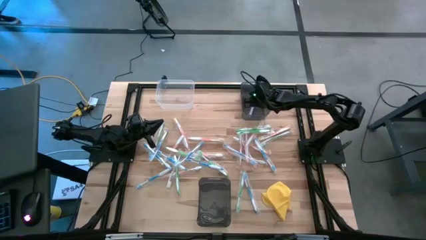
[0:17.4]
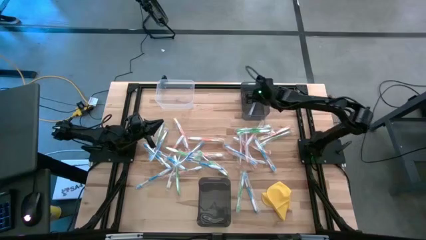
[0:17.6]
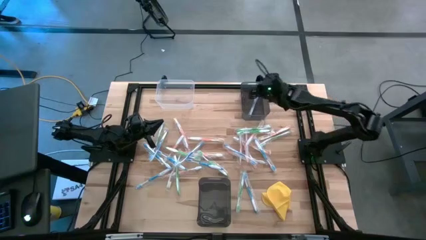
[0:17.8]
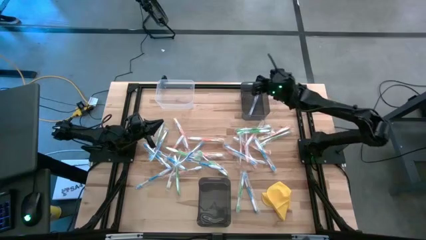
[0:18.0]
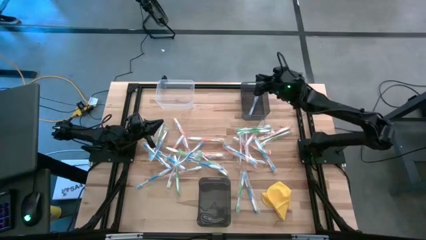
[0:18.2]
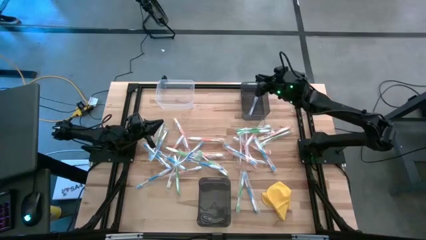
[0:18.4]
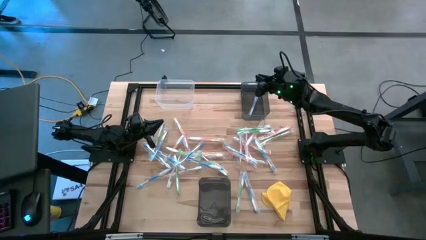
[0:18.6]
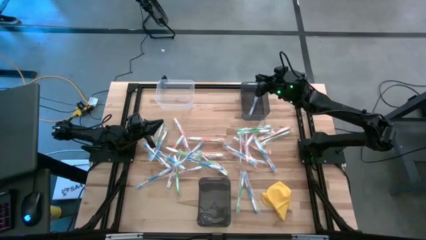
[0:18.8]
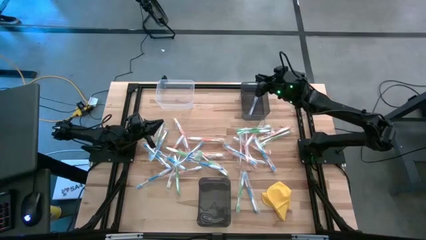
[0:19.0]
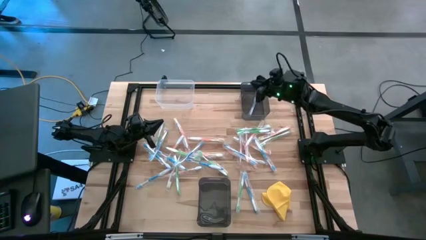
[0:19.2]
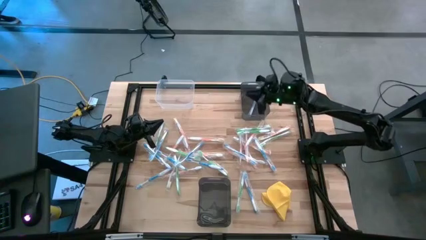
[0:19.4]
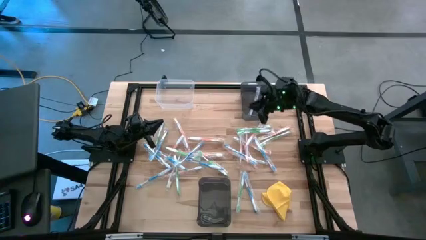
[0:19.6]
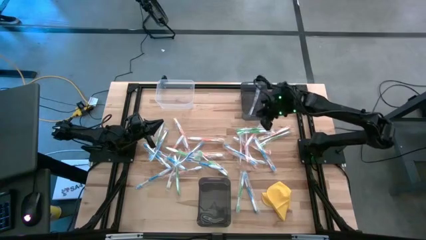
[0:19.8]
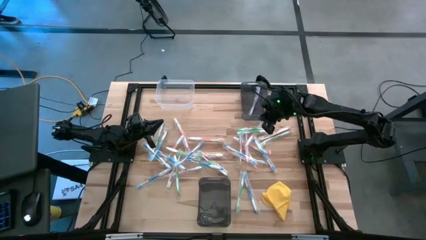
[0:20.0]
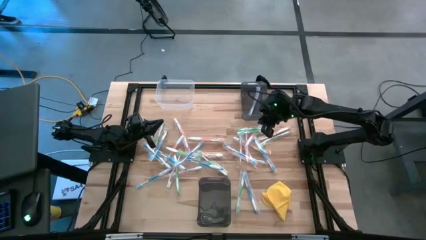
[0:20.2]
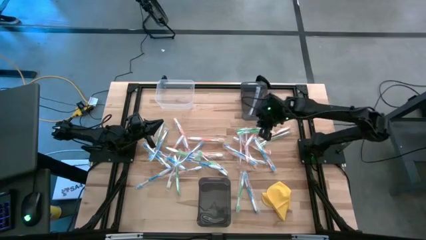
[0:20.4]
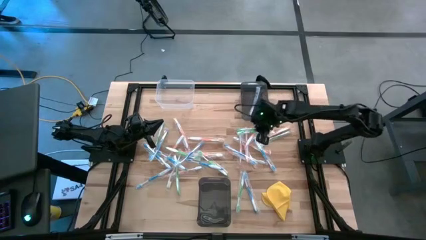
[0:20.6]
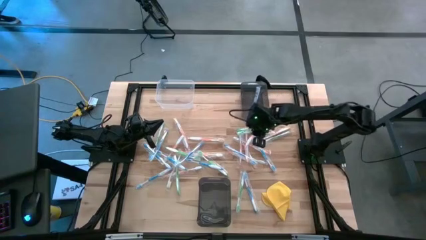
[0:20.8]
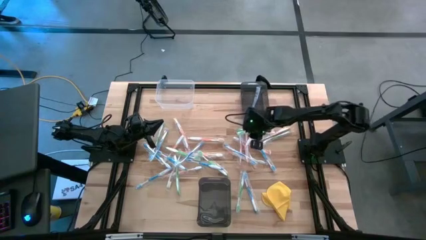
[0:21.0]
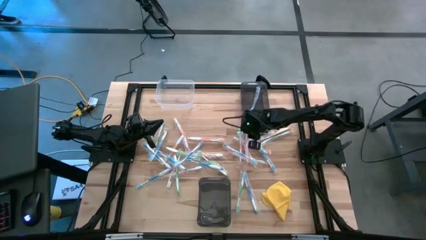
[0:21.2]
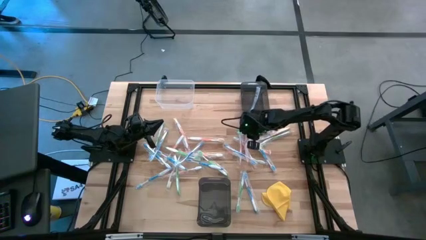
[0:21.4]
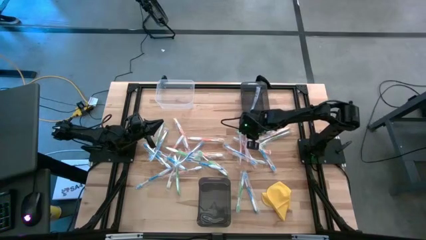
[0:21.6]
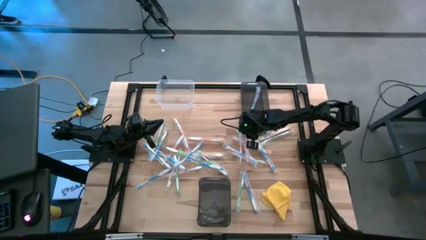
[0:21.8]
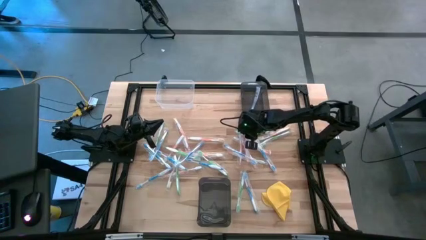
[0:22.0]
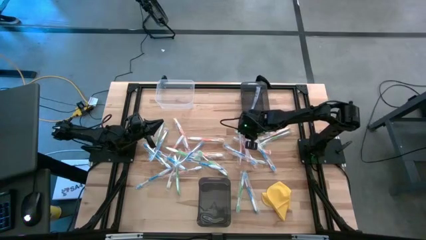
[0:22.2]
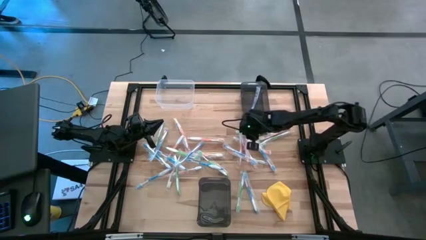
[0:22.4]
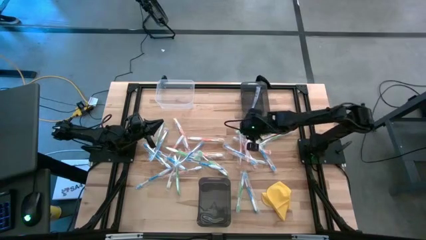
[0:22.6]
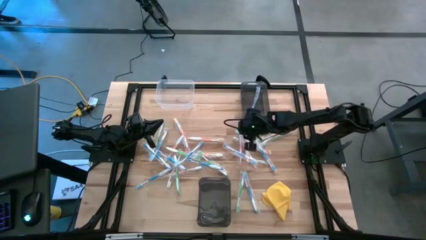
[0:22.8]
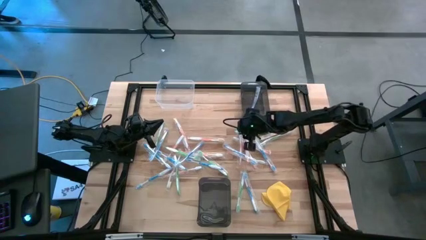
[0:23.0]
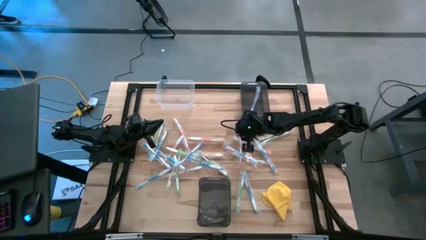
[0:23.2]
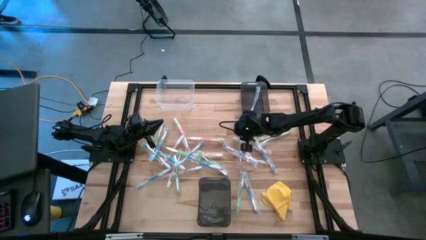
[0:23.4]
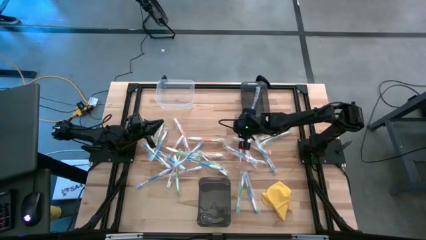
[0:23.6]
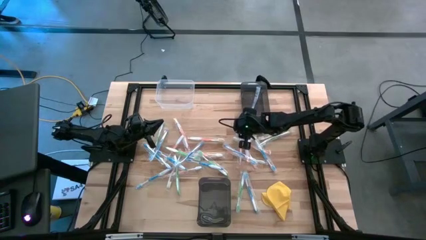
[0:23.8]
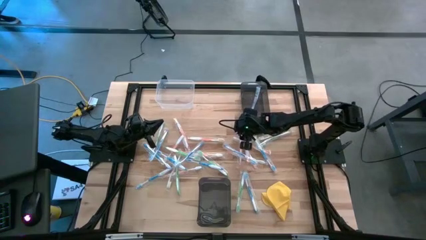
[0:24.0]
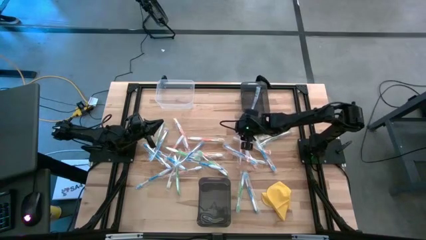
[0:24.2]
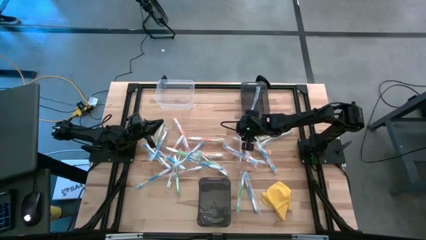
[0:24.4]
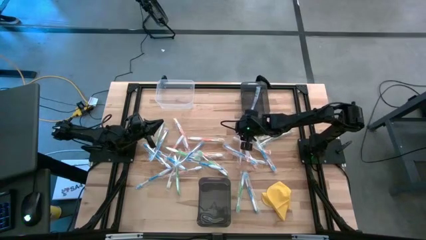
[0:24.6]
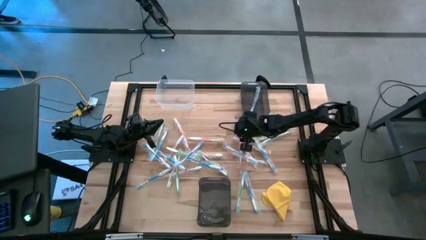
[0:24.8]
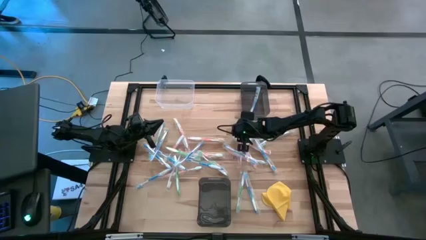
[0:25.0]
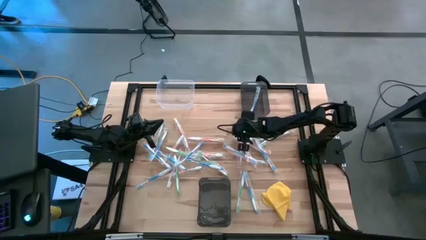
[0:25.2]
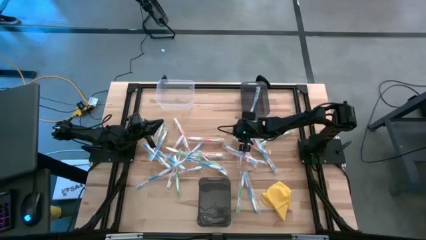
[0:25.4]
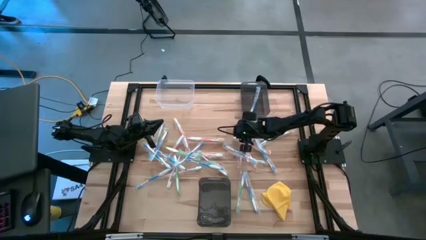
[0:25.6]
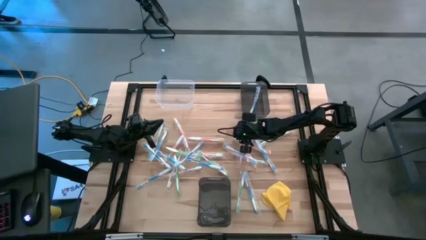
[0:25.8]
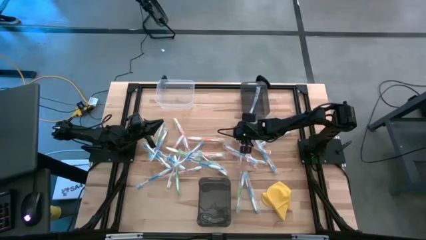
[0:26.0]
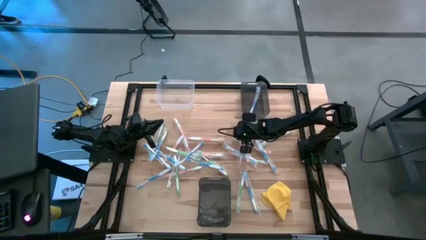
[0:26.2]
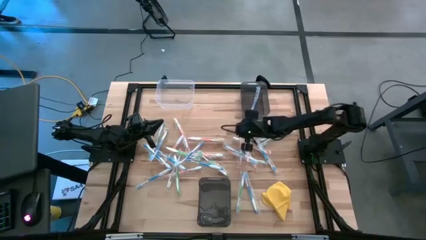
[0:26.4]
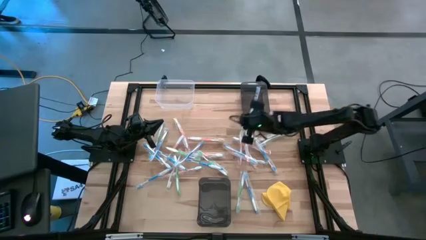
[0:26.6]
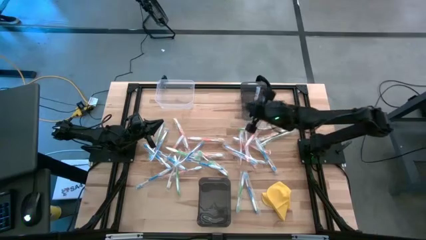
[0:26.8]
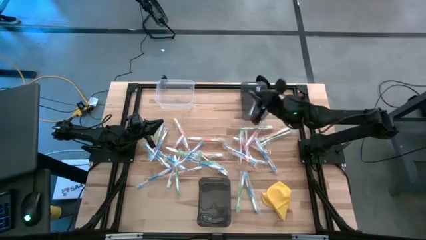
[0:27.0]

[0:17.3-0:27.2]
Task: Pick & Place Toothbrushes
Put the green toothbrush into the transparent bin

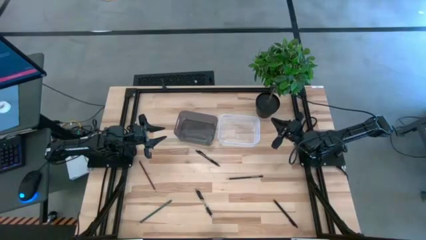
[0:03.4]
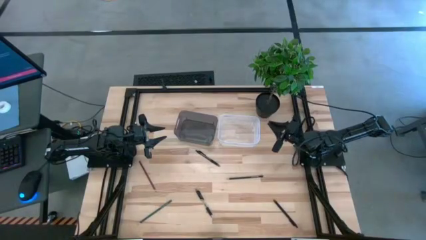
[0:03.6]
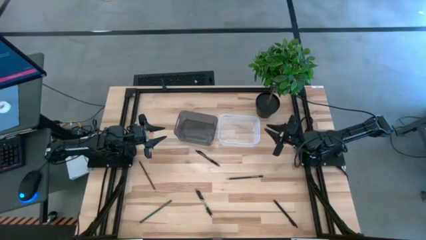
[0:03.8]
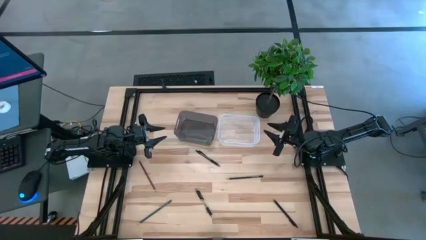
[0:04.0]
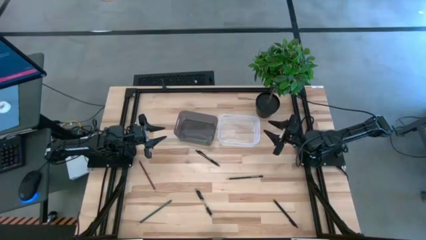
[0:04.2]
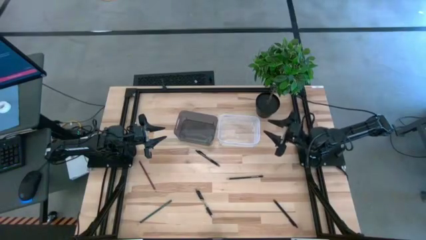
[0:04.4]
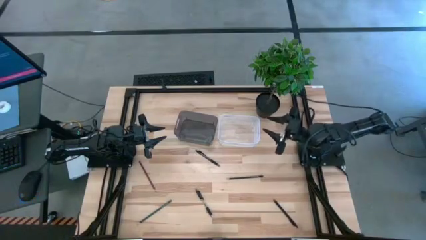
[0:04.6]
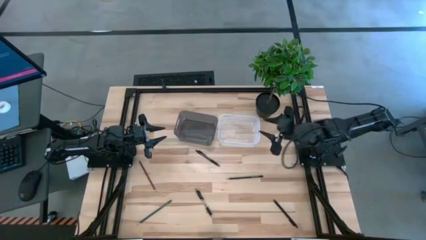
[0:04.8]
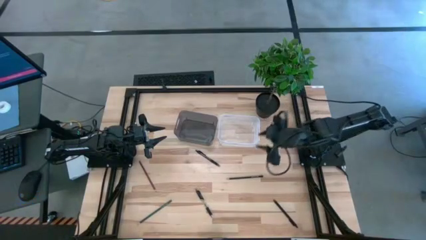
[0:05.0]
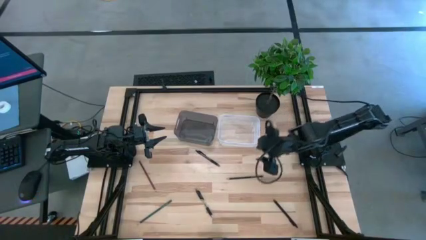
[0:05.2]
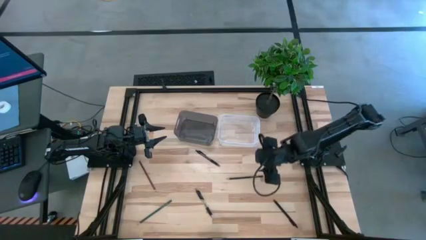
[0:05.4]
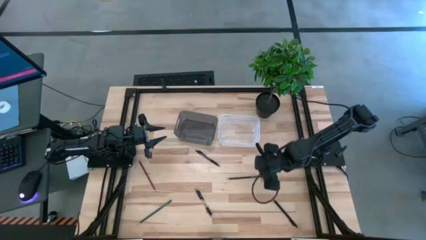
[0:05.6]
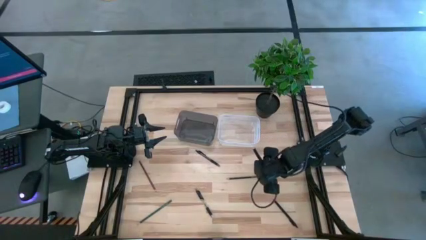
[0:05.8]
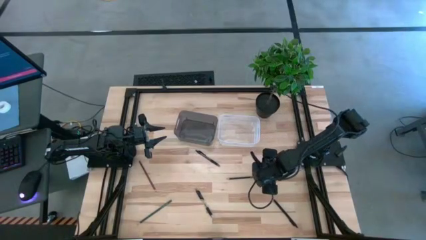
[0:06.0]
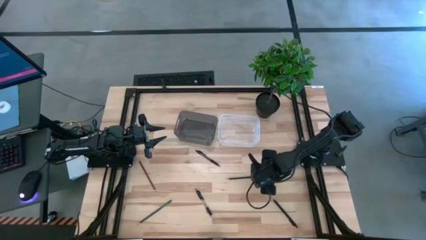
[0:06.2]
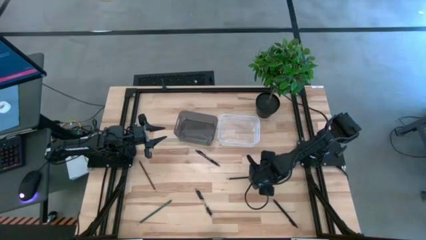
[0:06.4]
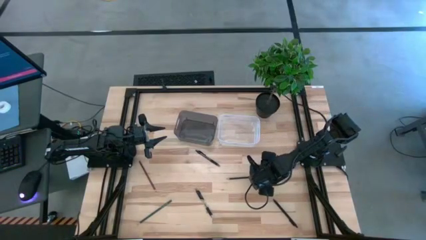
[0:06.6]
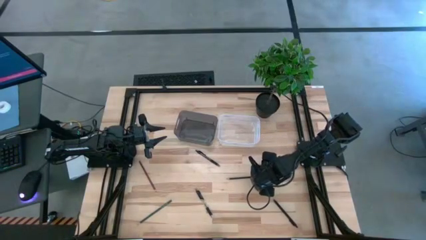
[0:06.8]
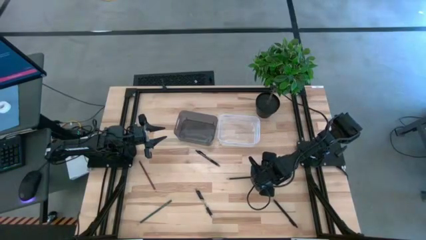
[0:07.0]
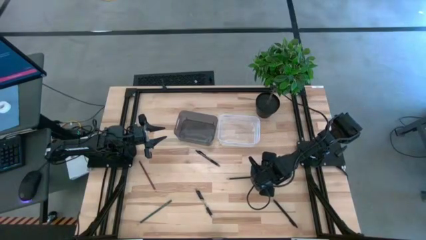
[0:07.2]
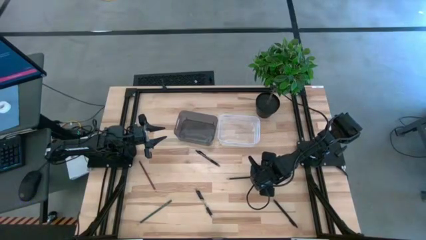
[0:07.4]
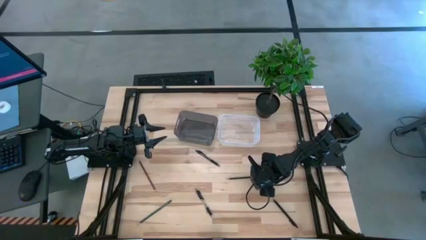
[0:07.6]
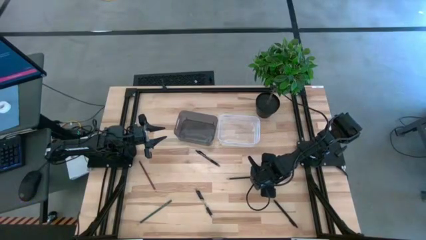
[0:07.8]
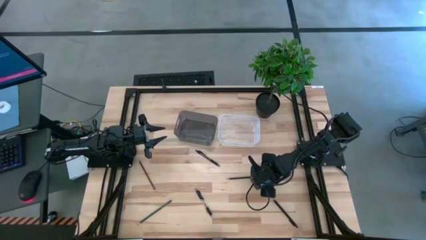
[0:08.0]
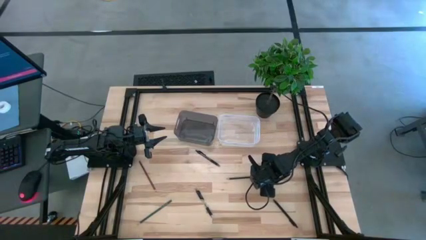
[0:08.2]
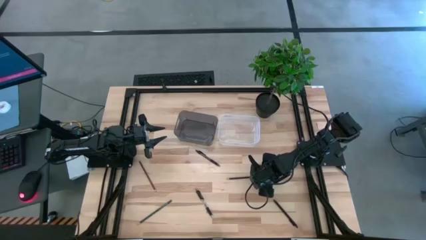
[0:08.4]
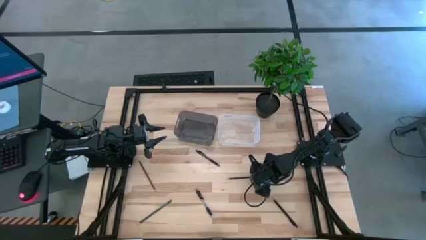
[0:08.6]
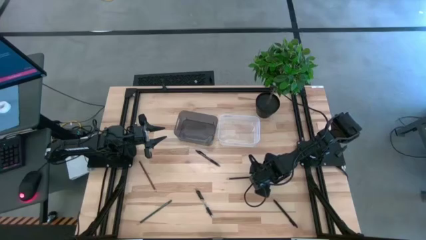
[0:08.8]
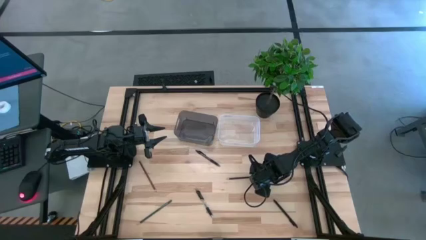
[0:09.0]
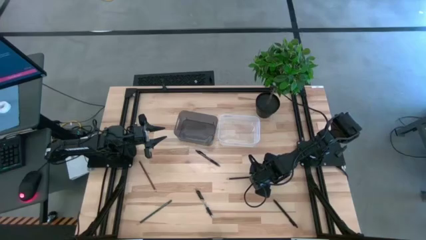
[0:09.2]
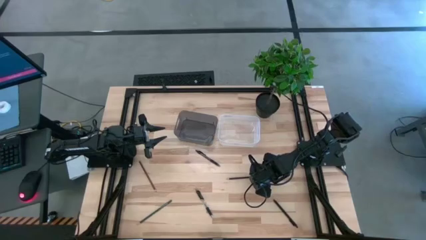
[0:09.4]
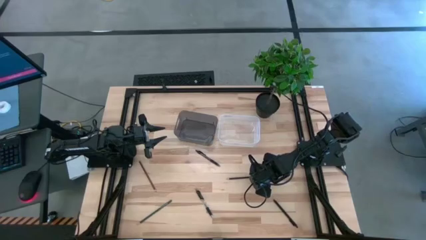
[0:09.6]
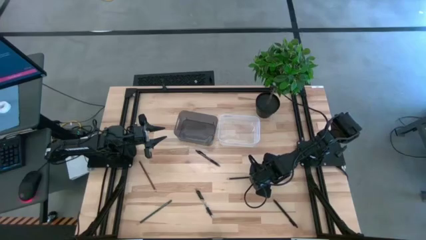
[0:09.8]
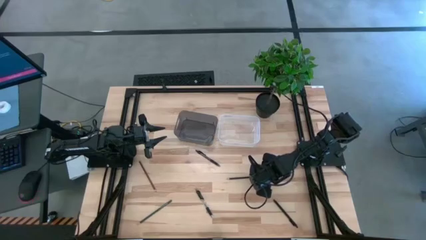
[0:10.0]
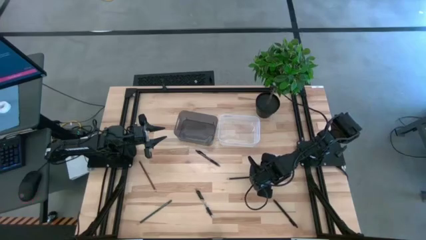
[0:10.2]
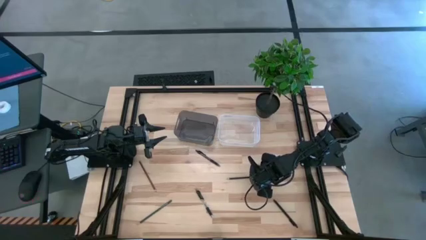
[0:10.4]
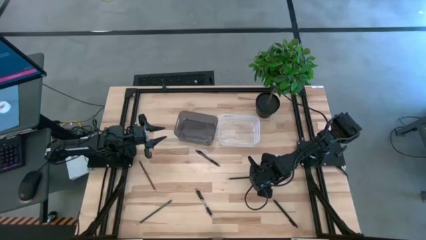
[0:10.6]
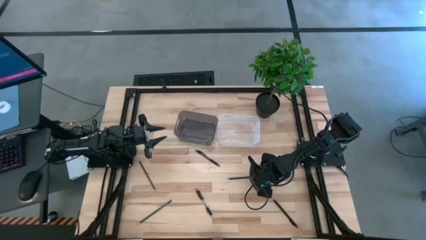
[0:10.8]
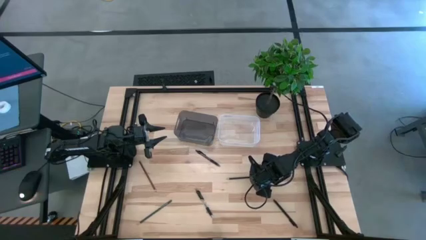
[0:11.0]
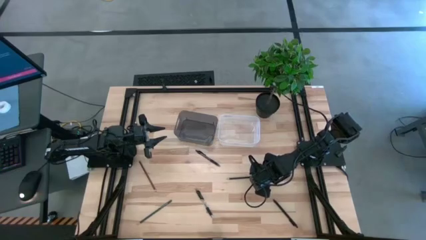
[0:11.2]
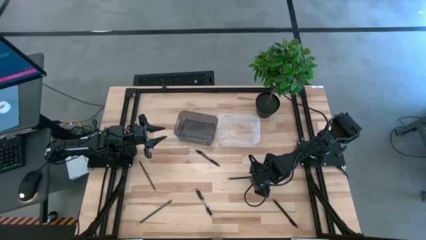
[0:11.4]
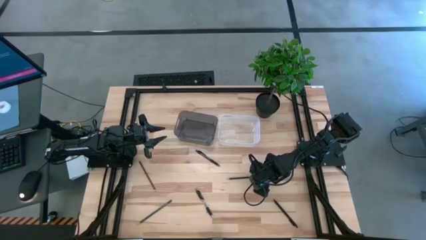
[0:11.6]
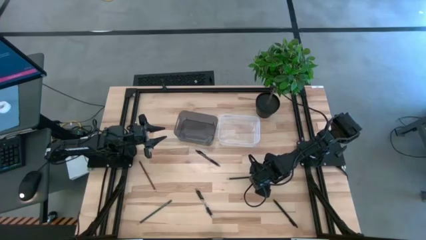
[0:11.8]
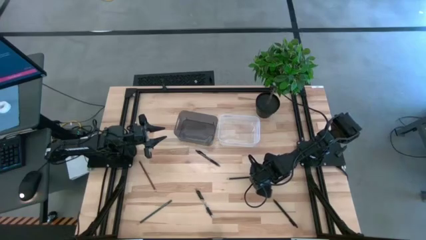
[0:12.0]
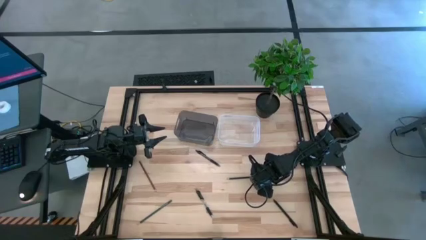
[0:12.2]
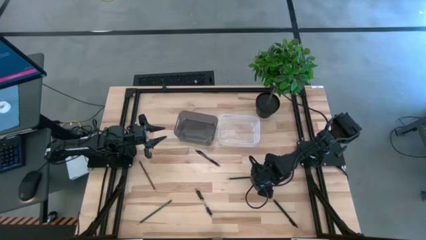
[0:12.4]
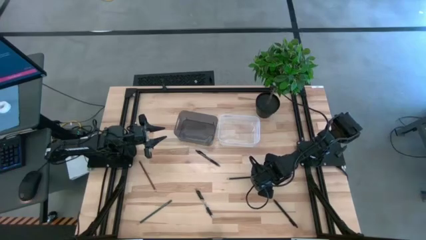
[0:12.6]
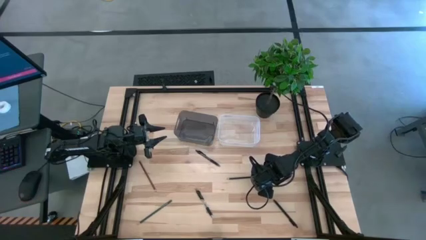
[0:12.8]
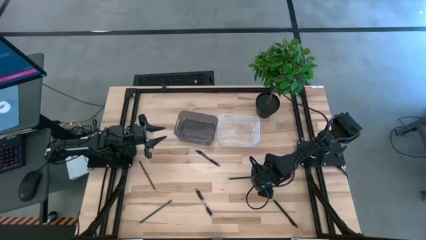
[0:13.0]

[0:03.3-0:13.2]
Task: Sort pens & pencils
Put the black colored pencil into the transparent bin
